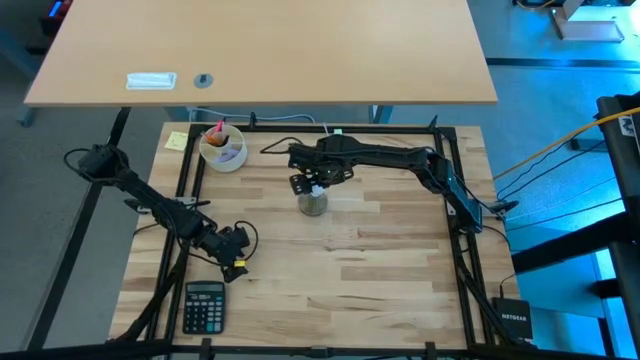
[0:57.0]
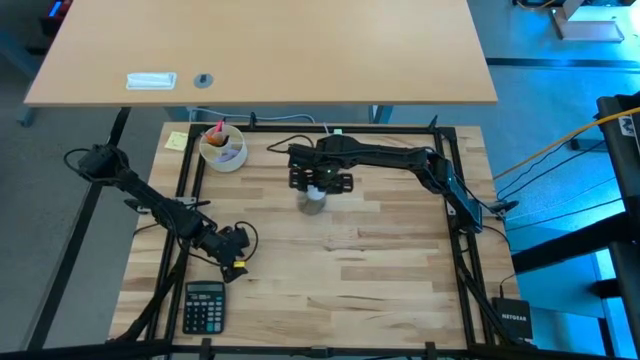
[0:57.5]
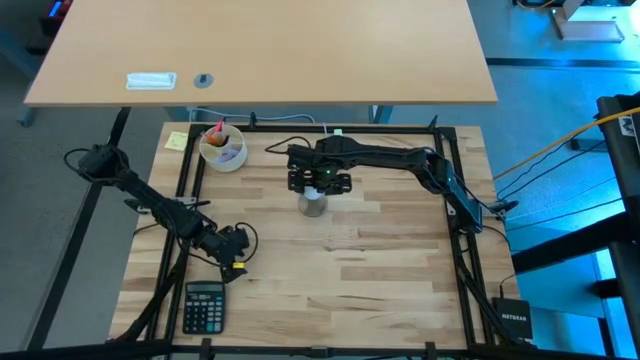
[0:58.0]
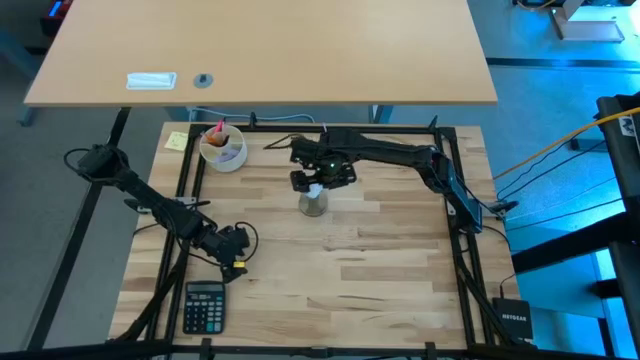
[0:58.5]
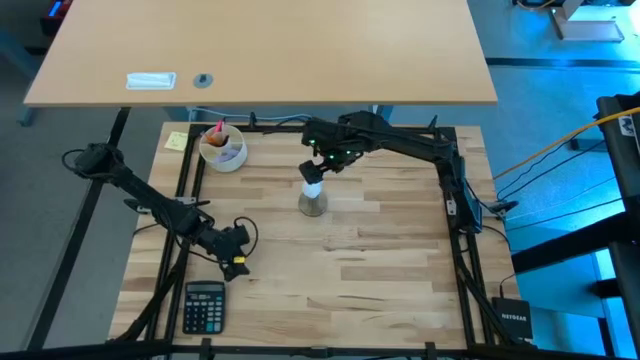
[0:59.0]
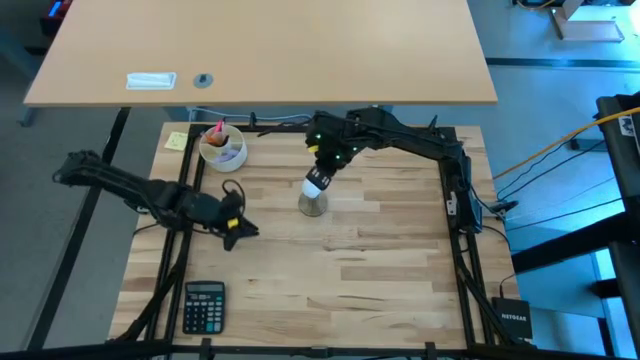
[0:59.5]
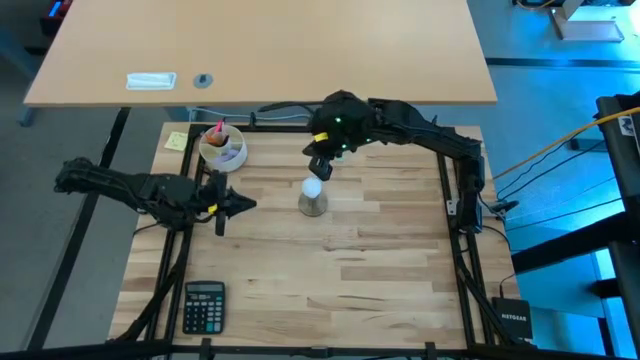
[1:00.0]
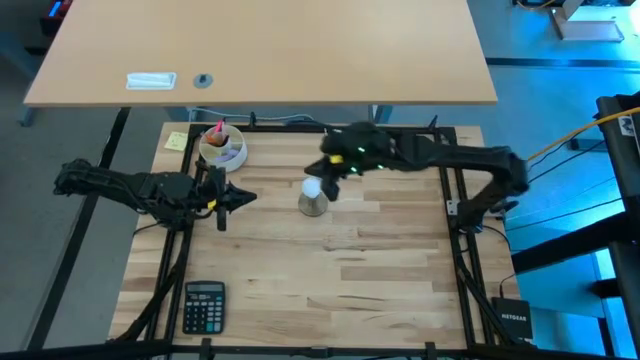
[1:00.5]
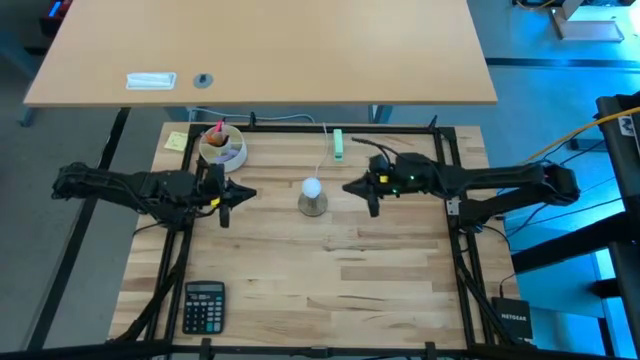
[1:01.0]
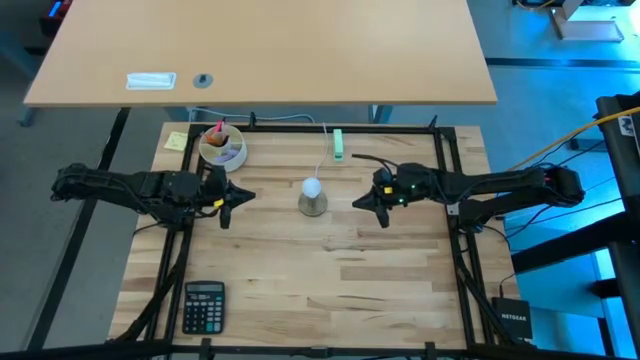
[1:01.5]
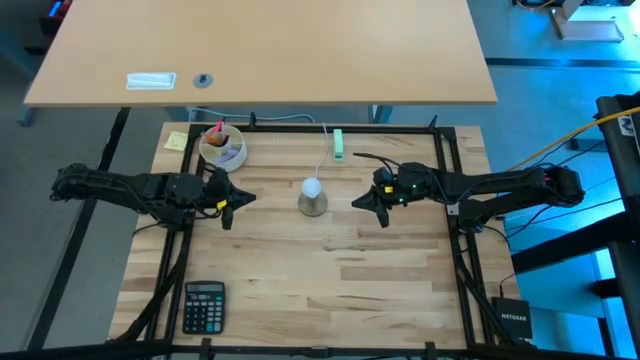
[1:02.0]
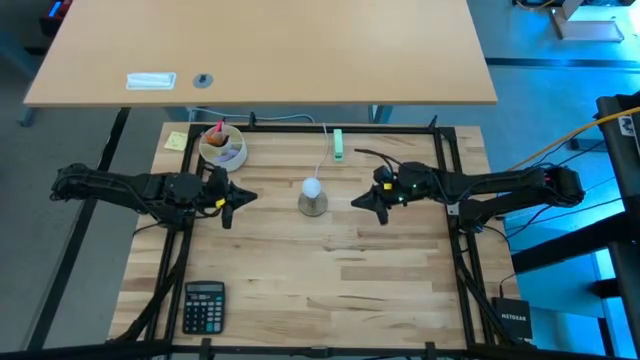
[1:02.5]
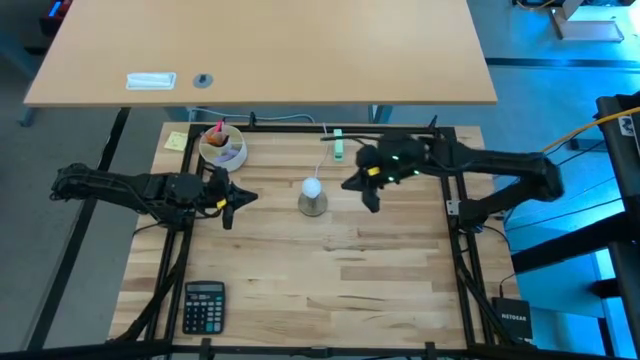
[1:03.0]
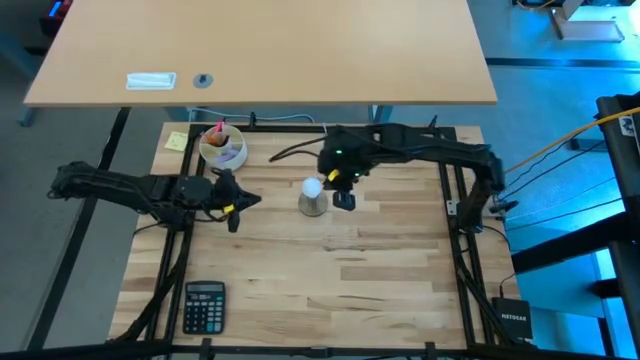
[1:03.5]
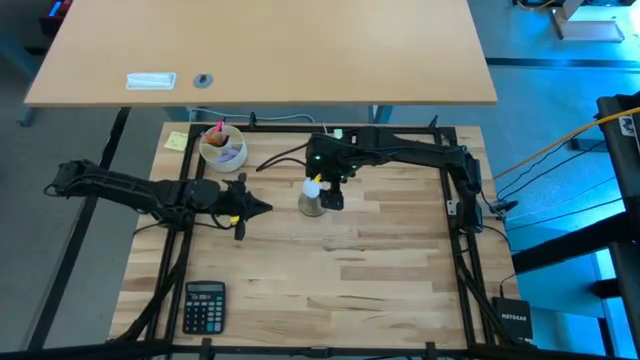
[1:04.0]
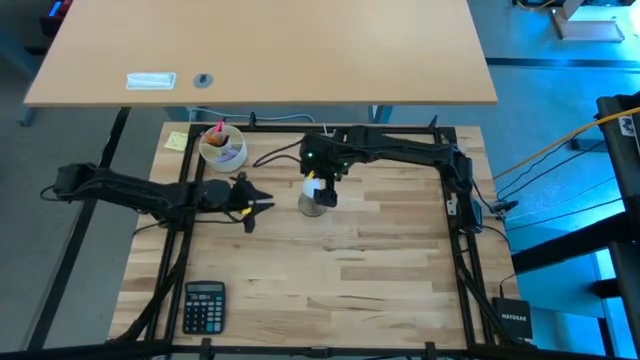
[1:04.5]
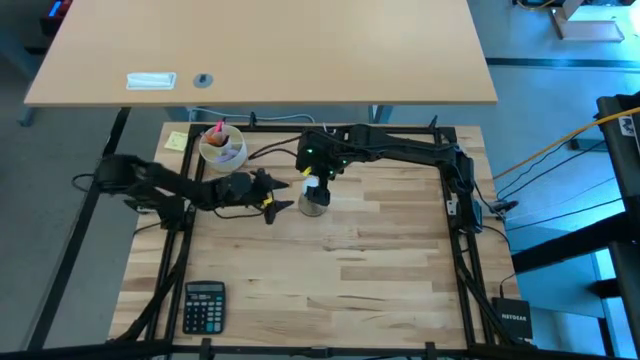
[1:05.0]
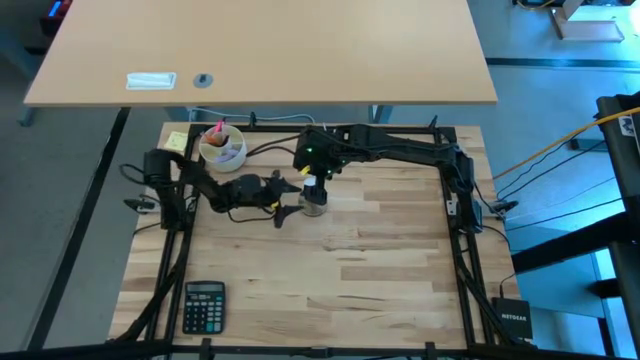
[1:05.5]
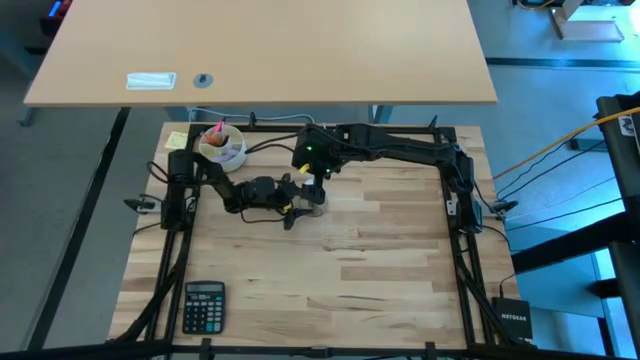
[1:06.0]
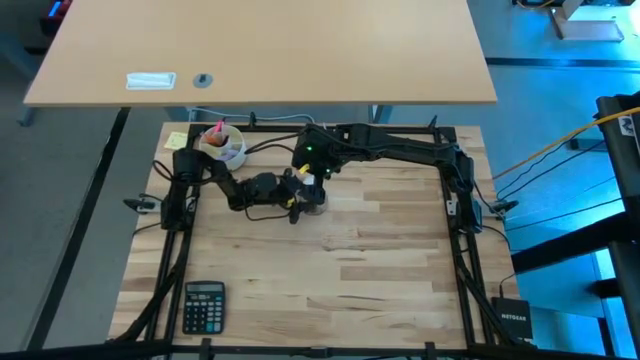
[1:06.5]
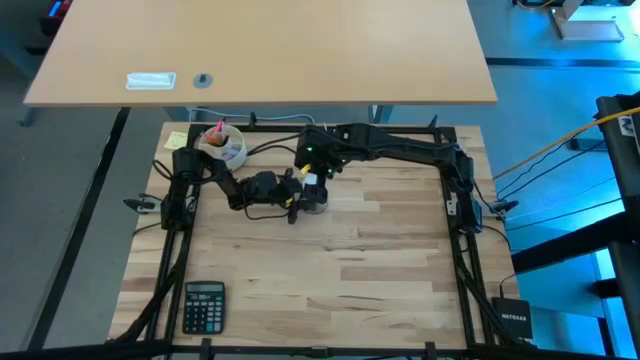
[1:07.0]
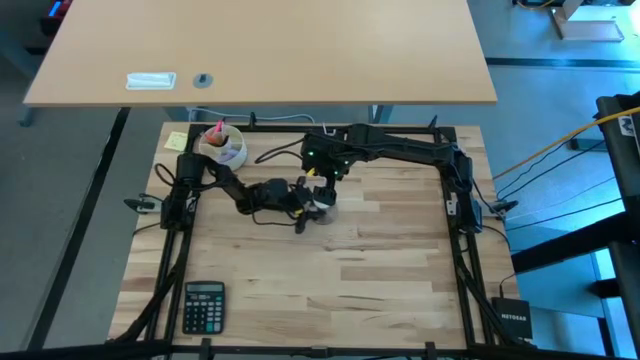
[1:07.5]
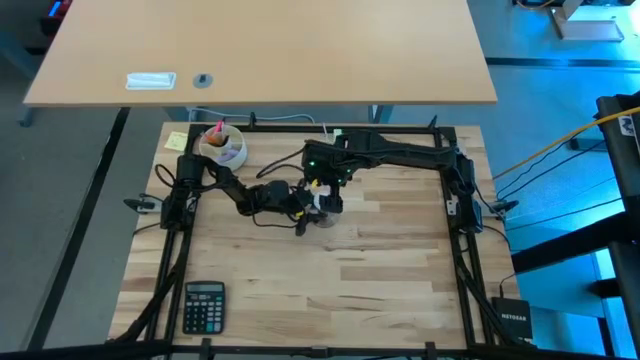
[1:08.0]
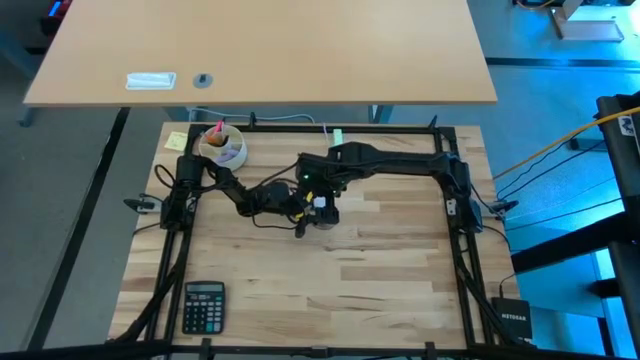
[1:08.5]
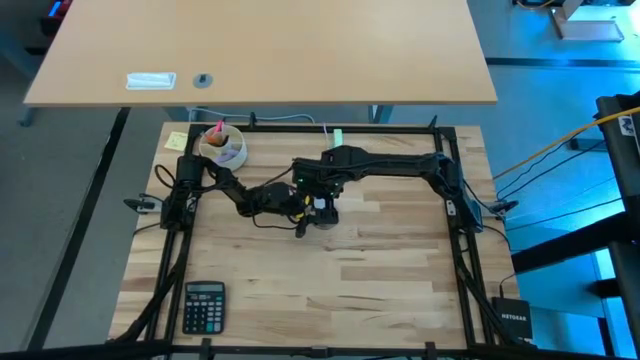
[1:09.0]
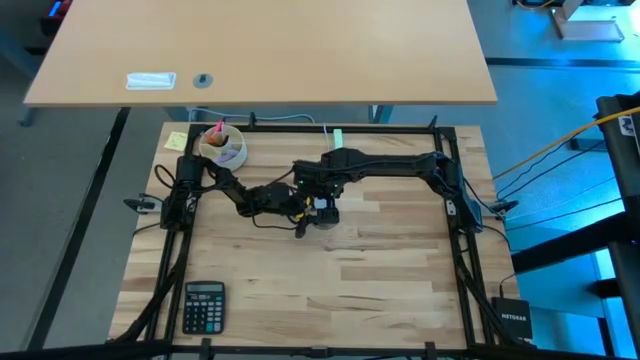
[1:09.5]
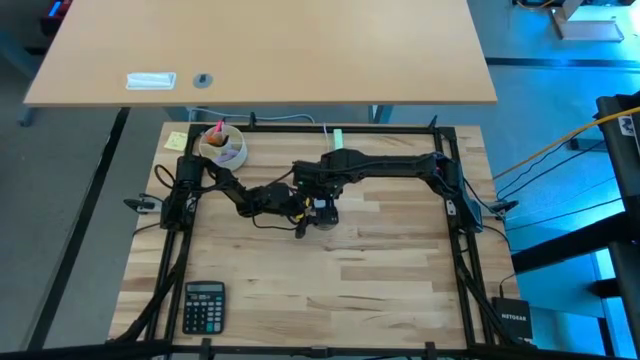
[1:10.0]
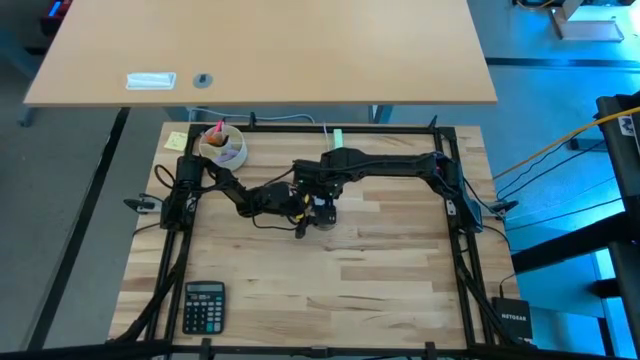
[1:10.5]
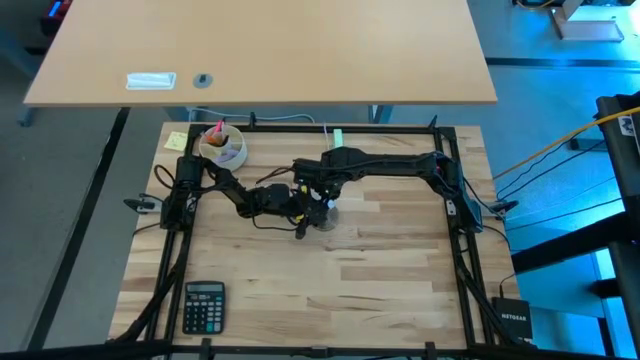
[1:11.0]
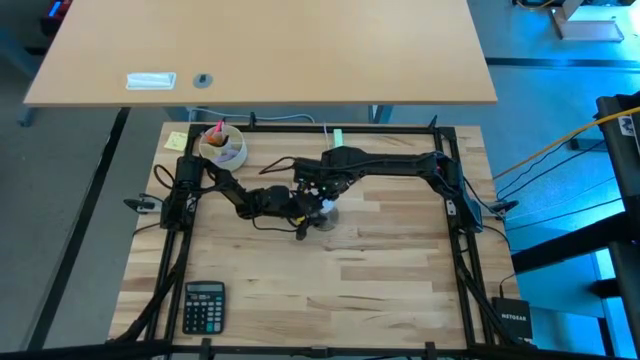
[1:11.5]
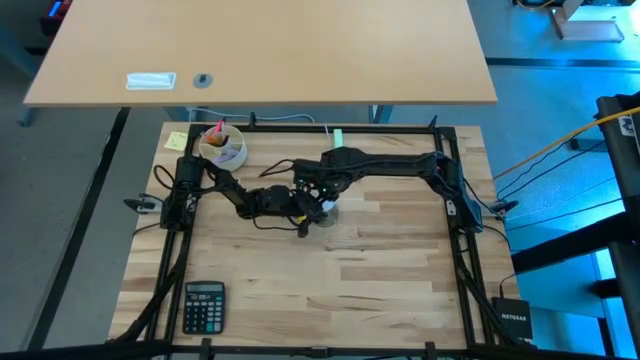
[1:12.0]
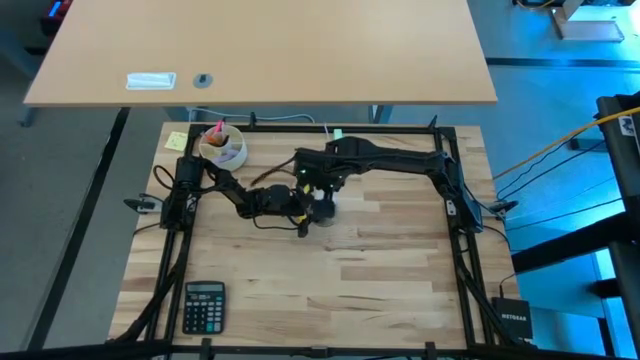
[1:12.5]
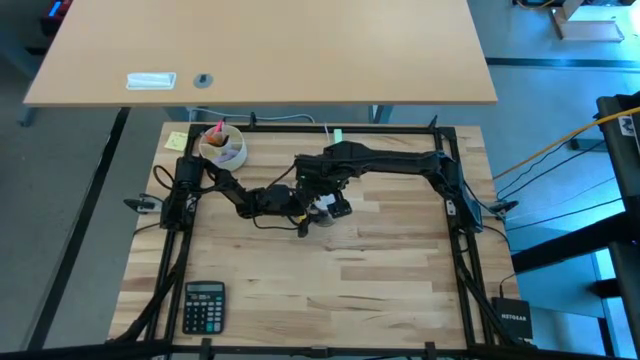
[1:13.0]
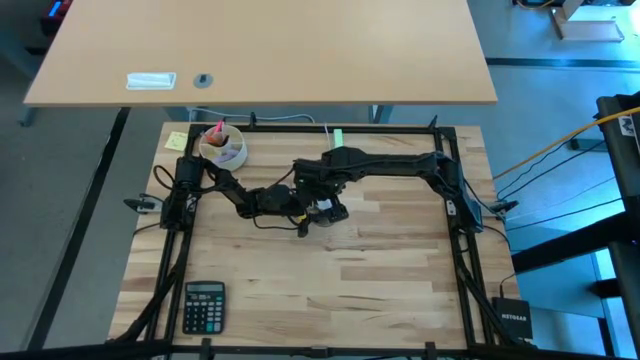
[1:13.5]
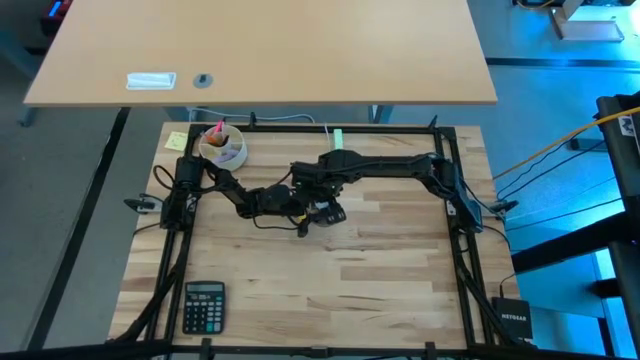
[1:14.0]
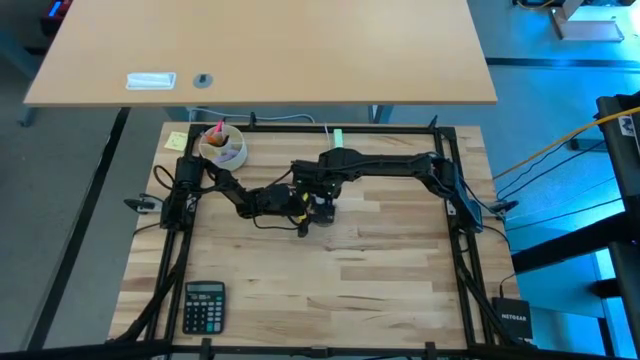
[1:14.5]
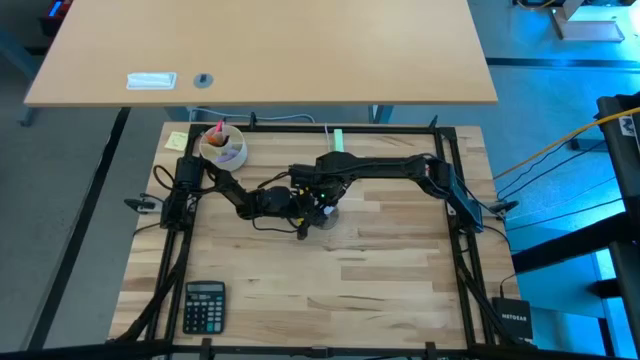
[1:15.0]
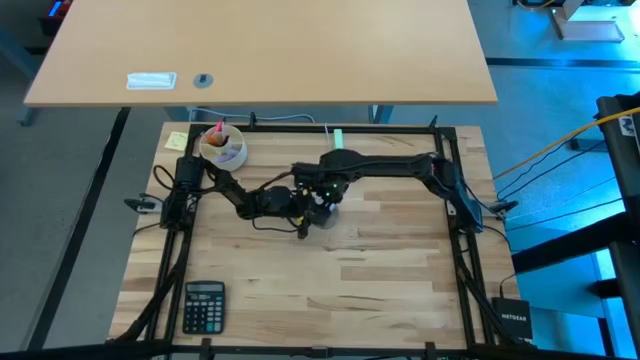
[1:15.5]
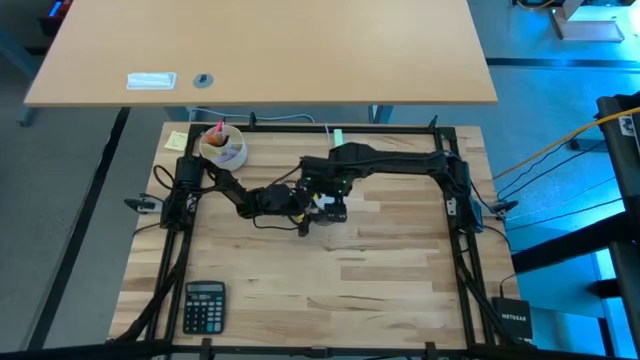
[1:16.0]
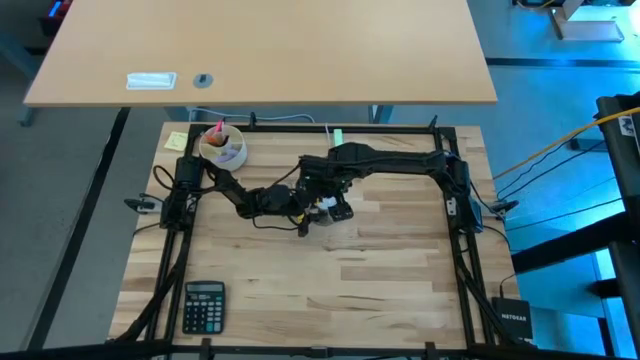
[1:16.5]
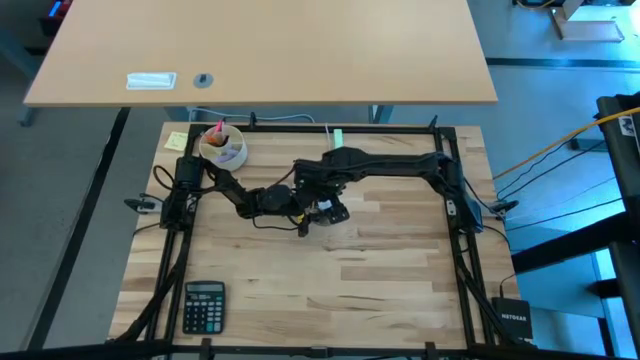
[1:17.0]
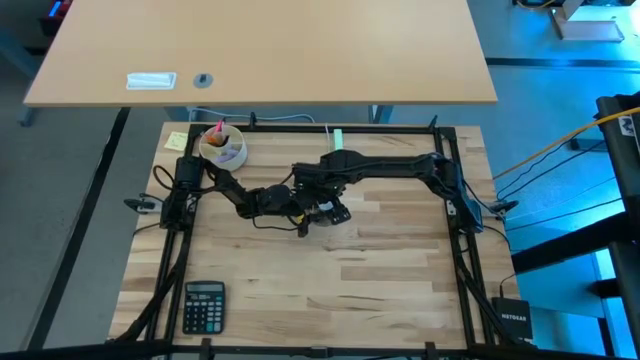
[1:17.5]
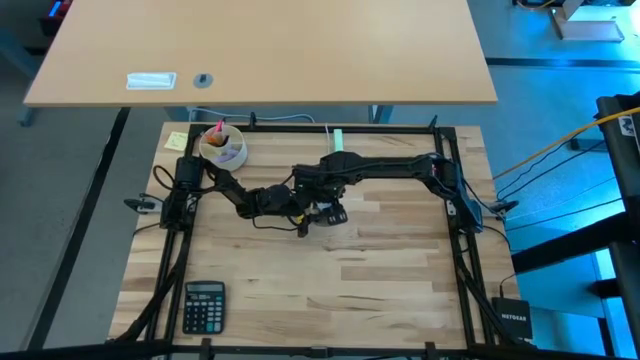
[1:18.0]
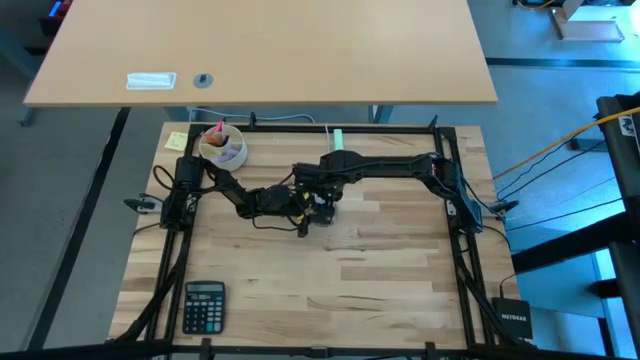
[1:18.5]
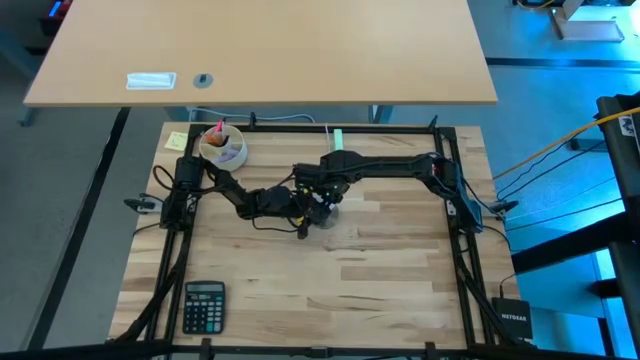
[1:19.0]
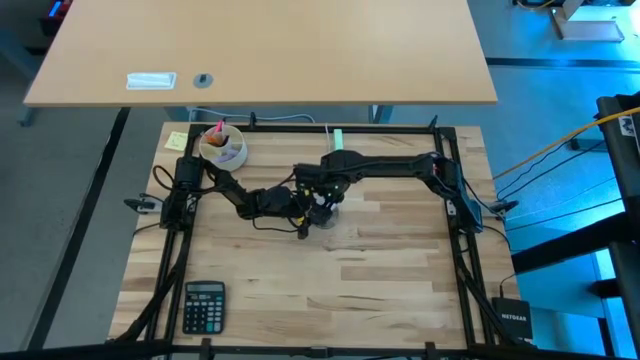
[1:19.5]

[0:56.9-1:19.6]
Task: Screw lightbulb
Insert the lightbulb into the lamp
